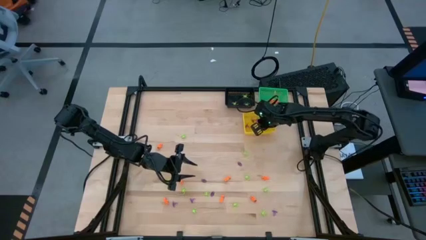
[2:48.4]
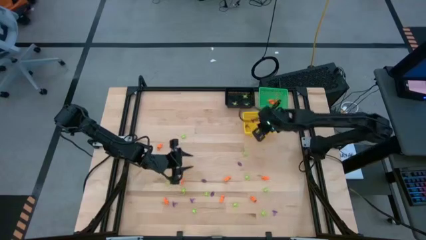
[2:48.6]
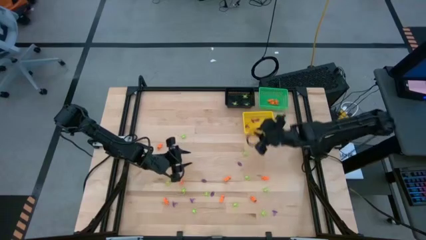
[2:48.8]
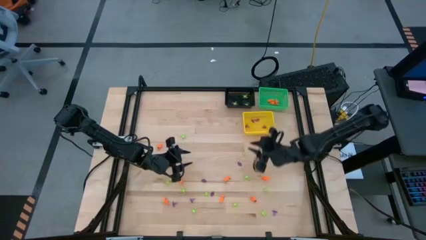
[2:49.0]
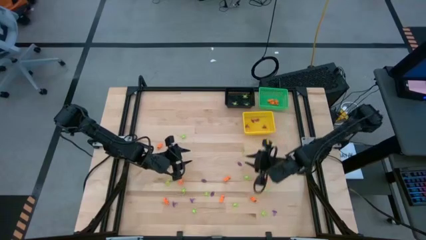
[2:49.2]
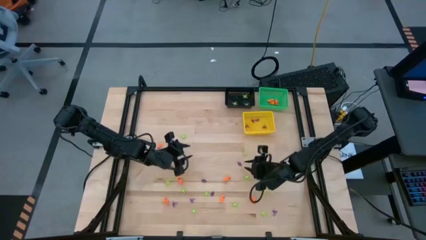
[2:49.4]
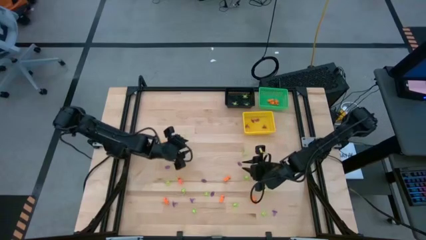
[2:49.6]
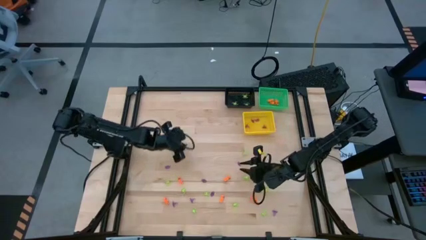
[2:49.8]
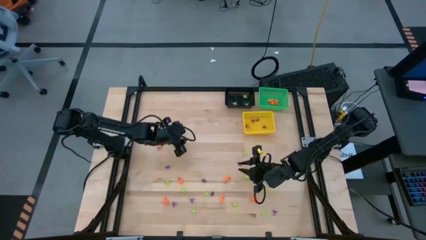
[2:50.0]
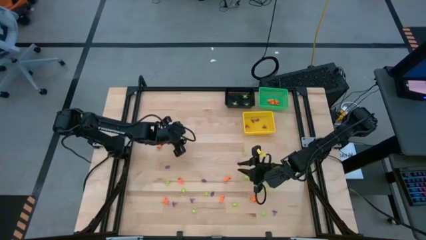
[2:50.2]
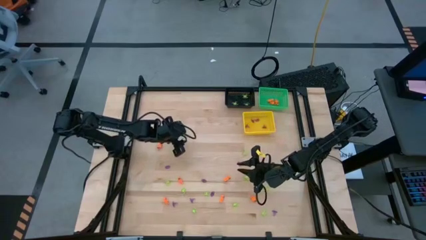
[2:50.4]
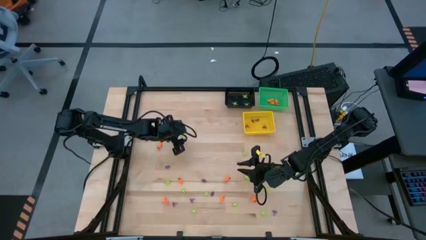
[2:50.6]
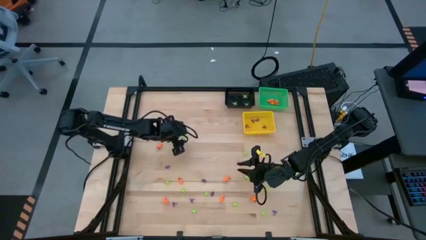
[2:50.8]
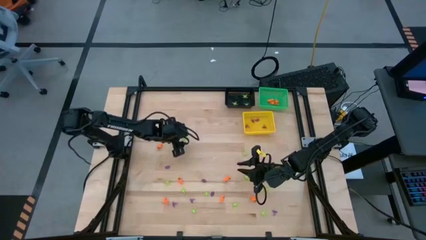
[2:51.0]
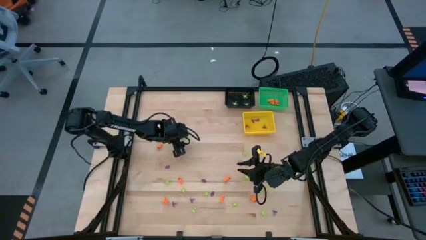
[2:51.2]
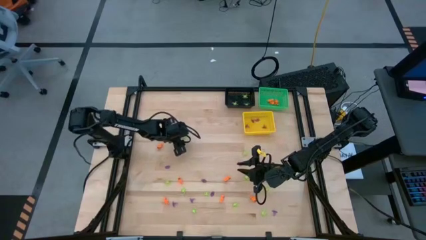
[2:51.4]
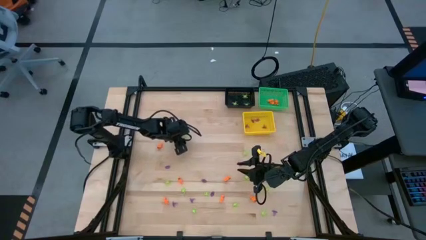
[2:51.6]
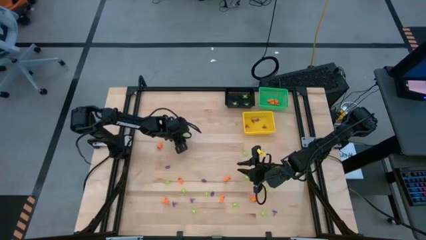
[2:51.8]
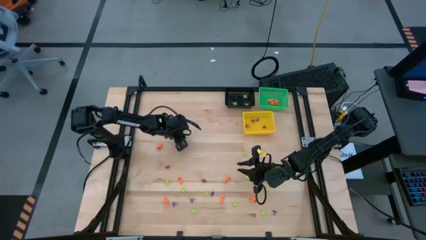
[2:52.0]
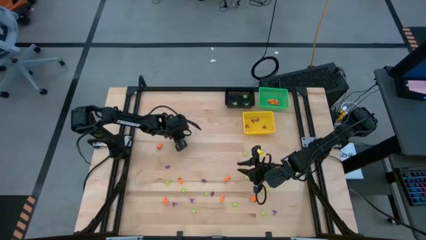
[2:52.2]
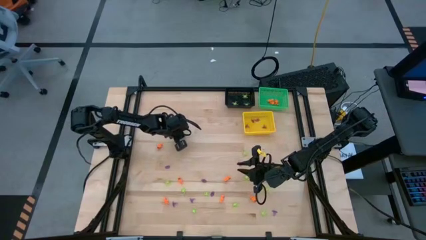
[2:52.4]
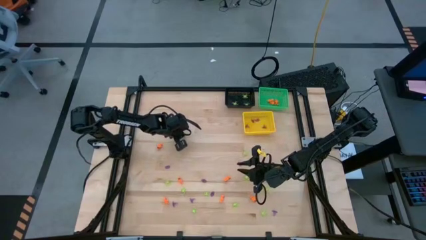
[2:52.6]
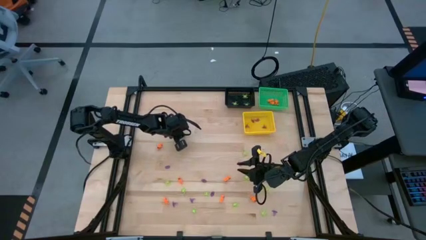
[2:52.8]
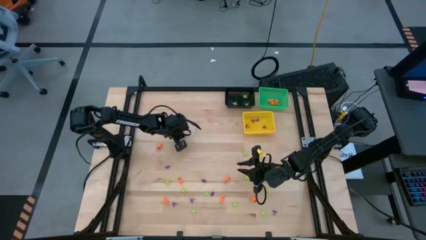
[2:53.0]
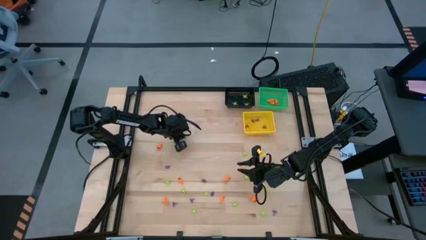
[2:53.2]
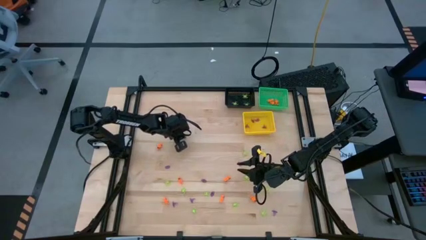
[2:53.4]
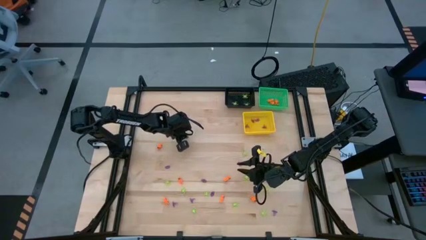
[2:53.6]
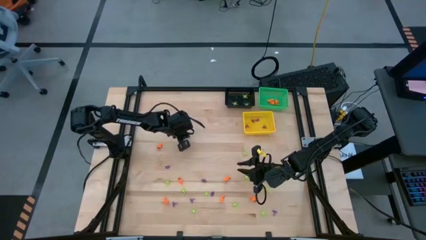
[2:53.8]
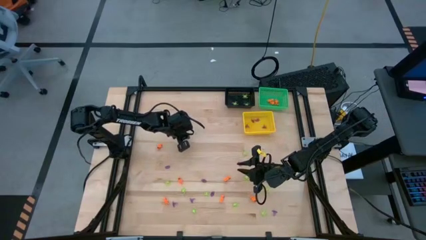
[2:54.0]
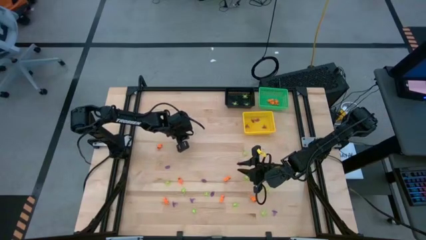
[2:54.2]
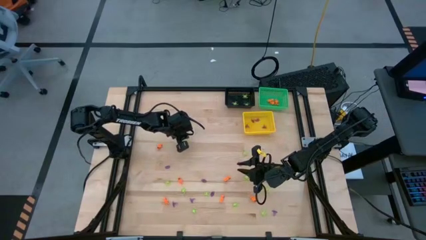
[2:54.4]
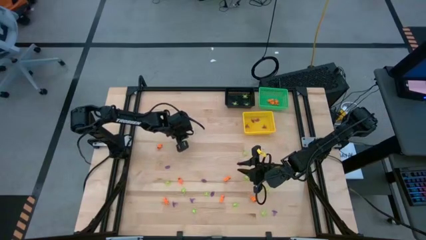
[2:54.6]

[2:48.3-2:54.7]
Task: Sort Halloween decoration
Put the green spider toy into the black basket

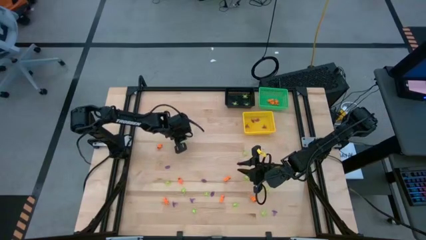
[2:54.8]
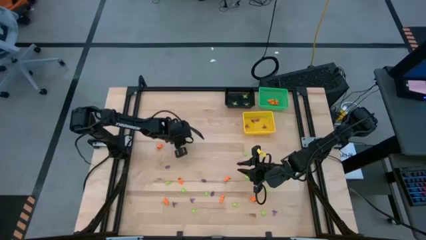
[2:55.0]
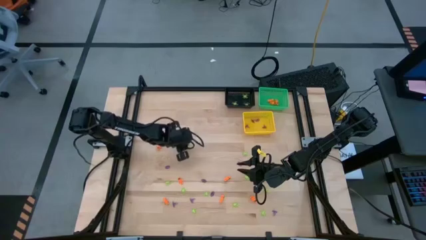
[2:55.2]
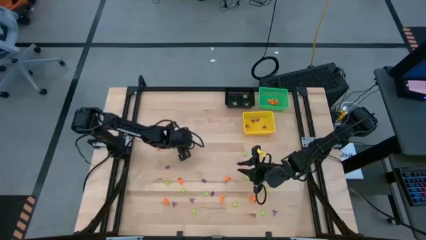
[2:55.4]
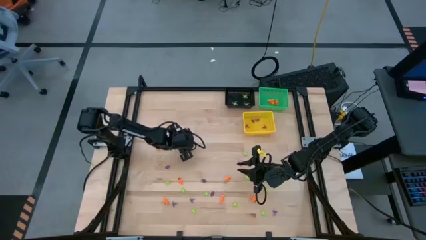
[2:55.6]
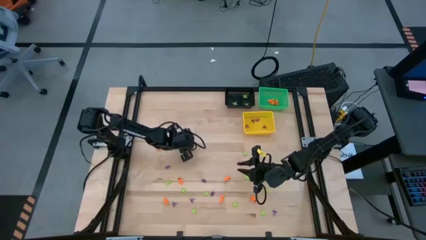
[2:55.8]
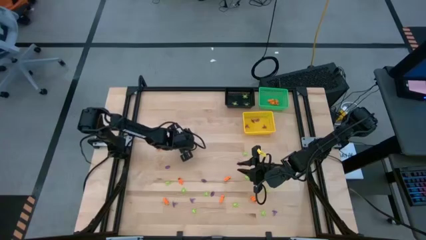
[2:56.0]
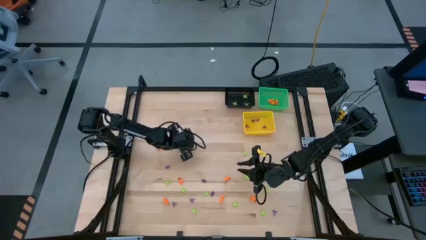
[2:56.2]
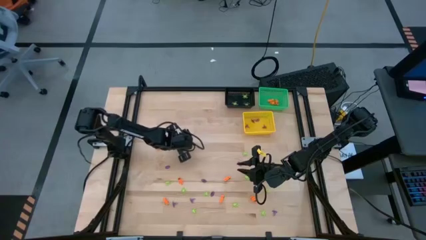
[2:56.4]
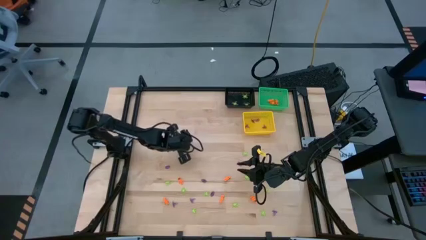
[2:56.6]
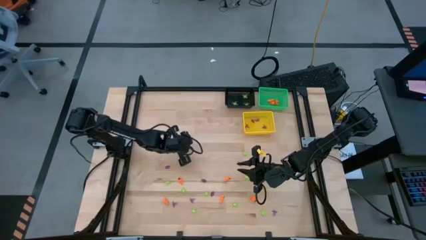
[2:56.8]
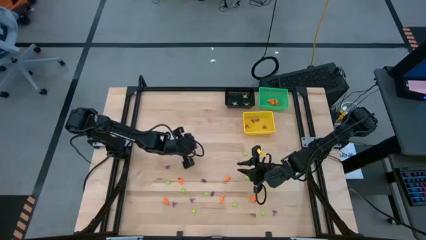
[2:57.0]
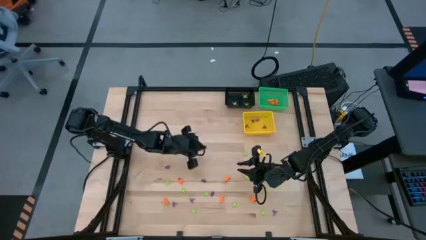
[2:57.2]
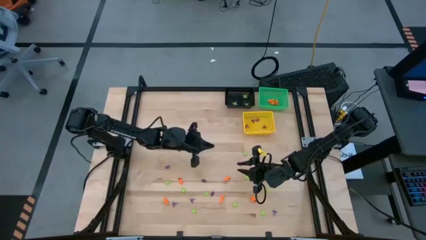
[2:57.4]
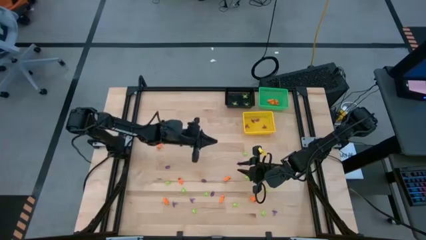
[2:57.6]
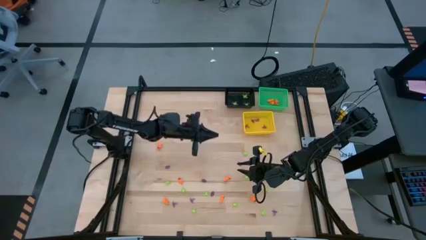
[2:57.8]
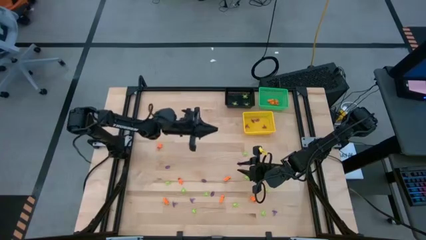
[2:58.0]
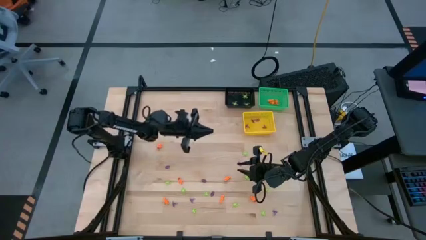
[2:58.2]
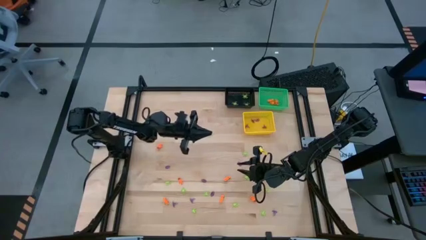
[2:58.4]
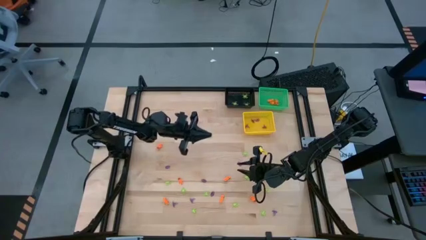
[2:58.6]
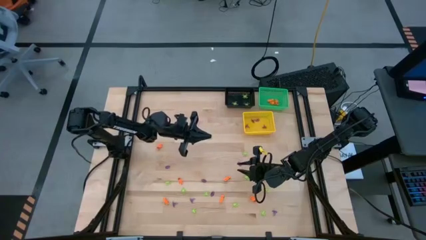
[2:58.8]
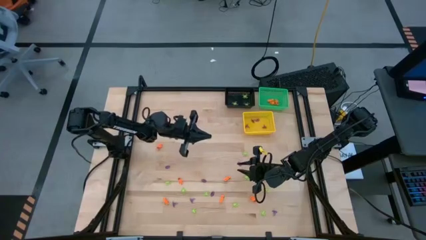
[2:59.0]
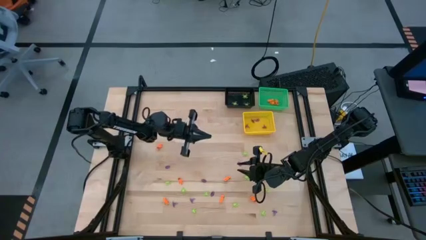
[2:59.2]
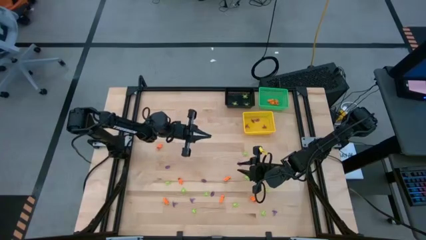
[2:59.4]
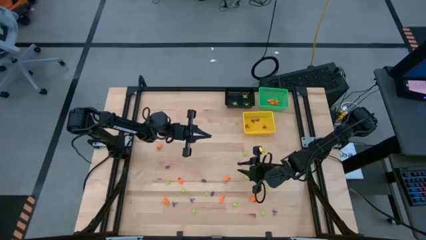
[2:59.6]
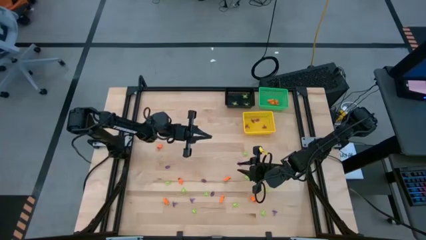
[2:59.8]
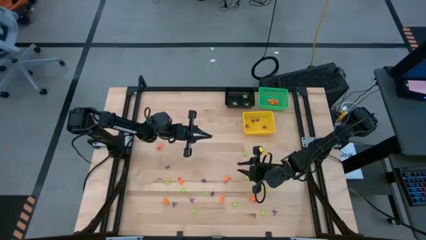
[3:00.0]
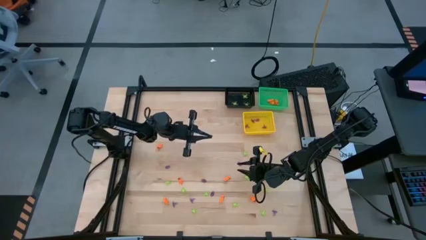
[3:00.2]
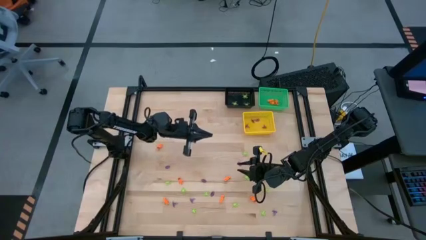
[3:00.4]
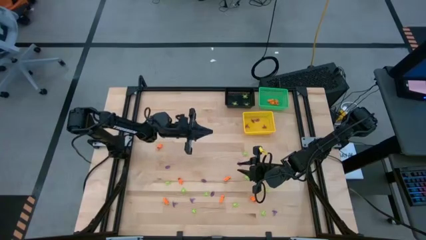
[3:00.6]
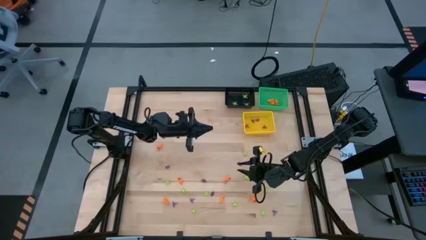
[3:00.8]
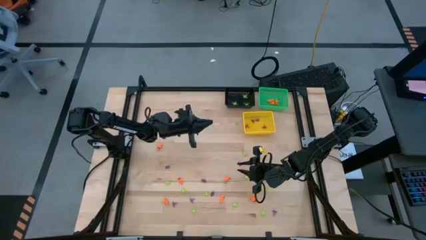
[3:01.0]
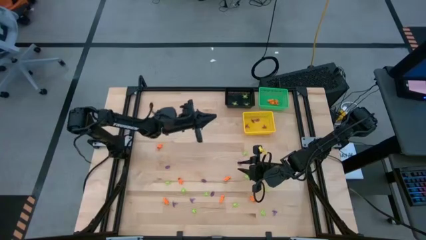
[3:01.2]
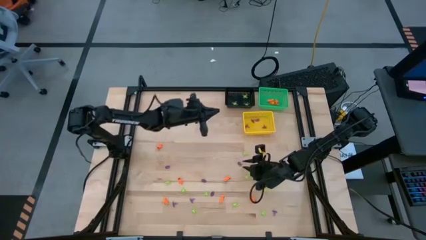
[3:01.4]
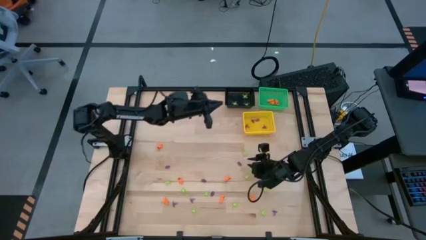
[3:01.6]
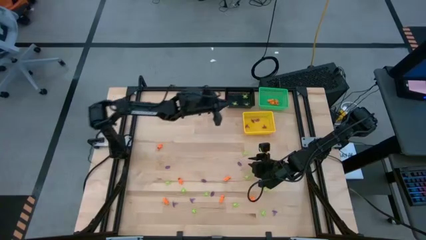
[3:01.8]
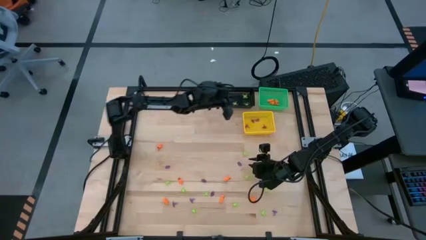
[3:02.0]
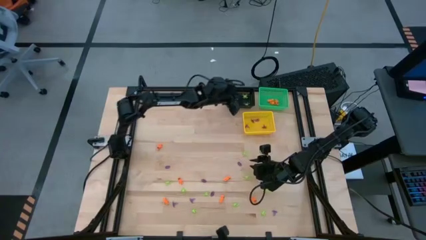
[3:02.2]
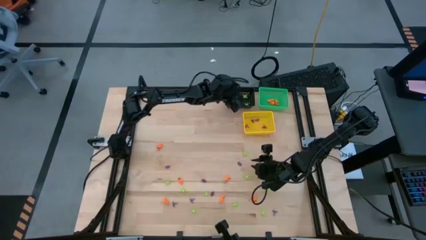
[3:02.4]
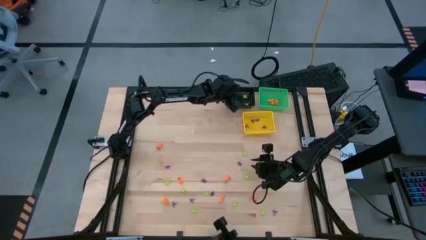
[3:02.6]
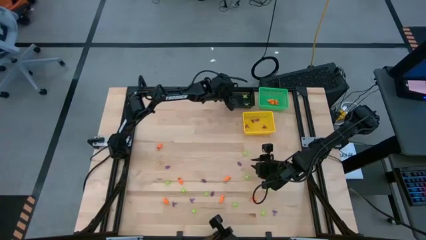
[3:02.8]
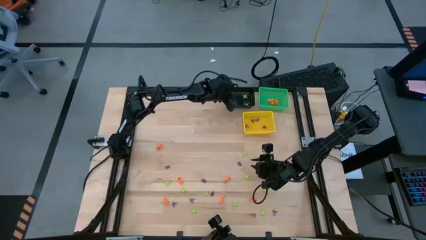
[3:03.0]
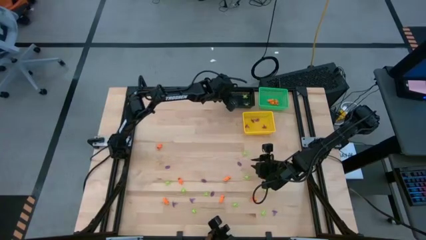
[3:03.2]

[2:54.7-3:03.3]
Put the green spider toy into the black basket

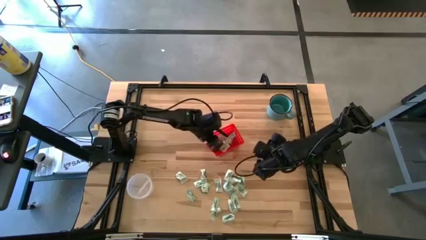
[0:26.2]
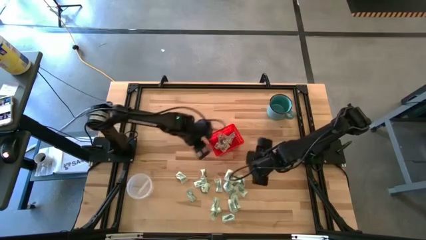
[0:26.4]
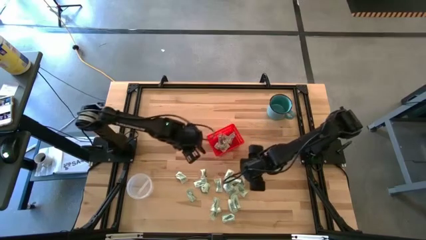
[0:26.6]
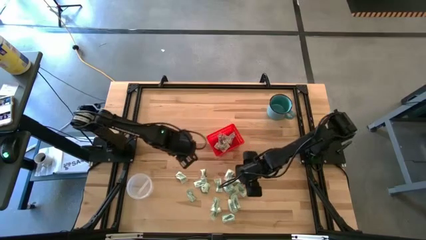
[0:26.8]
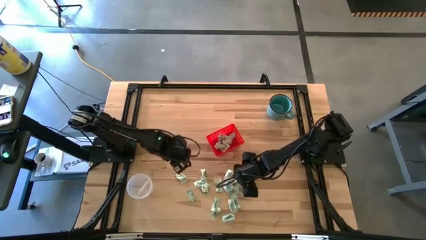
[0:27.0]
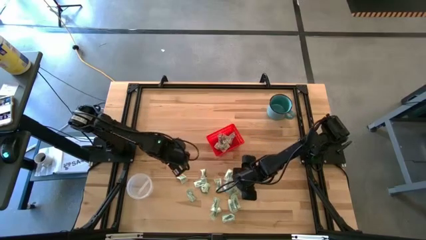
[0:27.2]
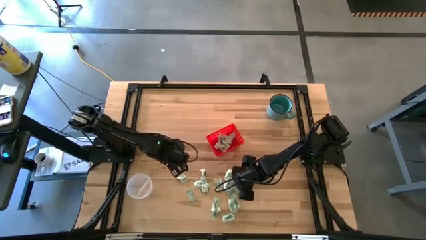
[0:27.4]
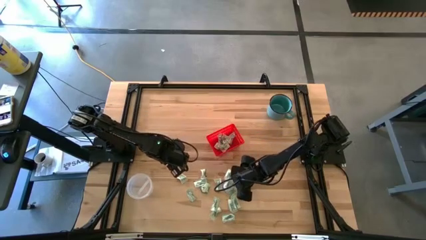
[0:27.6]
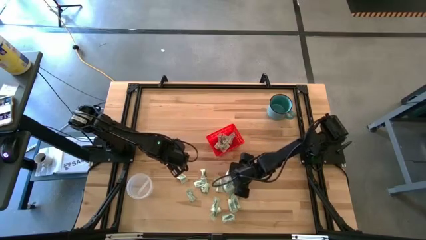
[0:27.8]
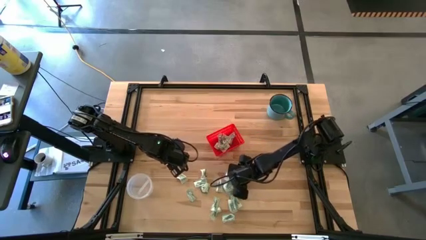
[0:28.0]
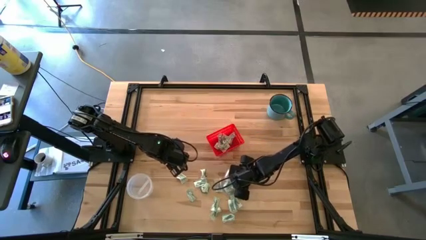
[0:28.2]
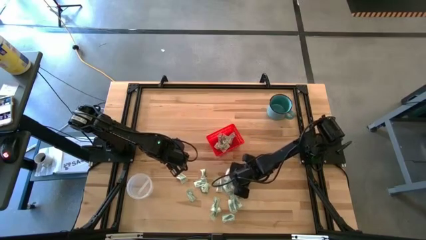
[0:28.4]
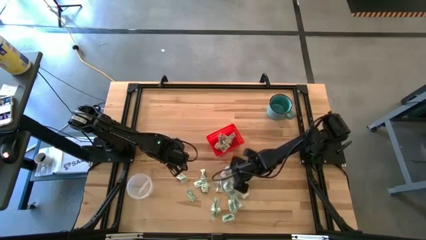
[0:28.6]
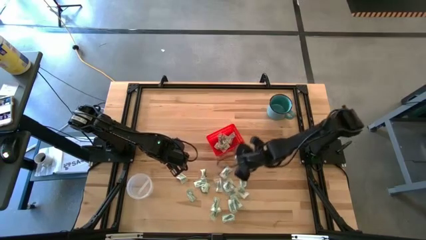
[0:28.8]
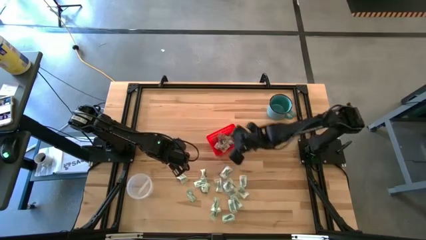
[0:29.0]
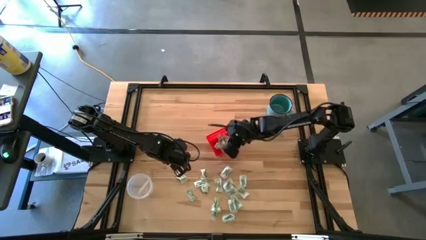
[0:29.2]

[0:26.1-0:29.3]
Task: Pick and place items into bin
Put the truvia packet into the red bin
